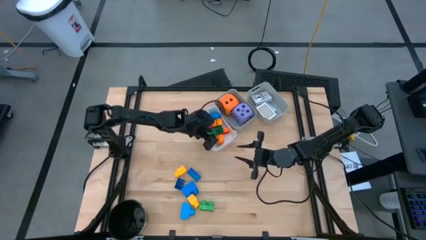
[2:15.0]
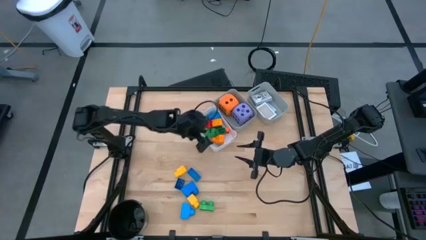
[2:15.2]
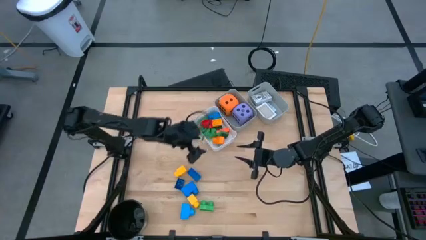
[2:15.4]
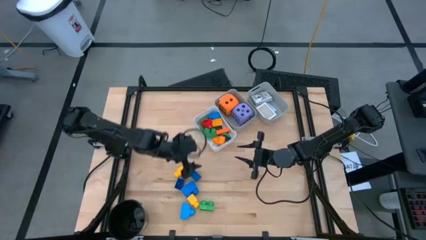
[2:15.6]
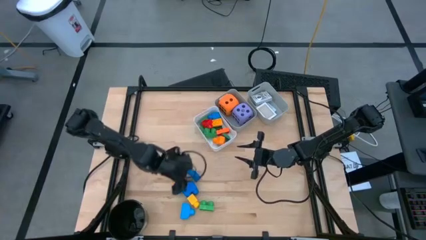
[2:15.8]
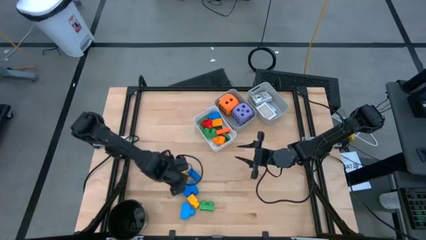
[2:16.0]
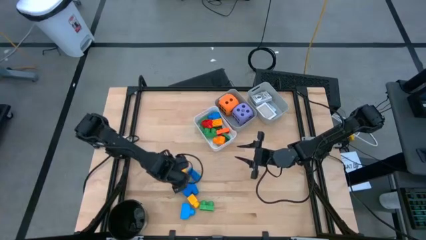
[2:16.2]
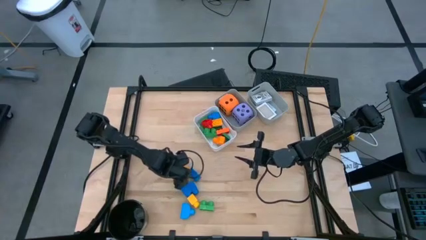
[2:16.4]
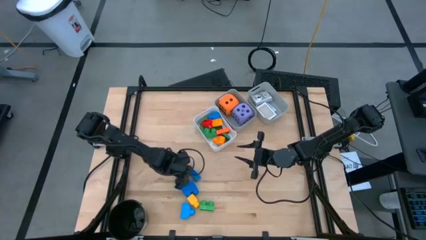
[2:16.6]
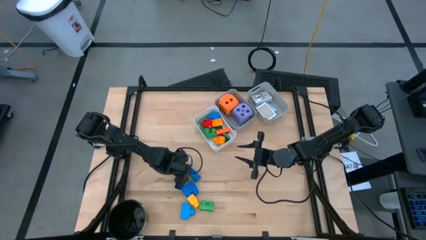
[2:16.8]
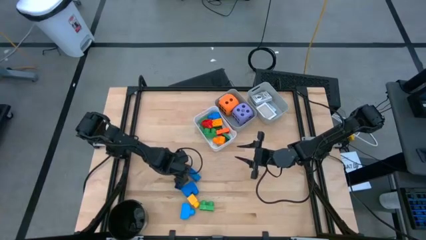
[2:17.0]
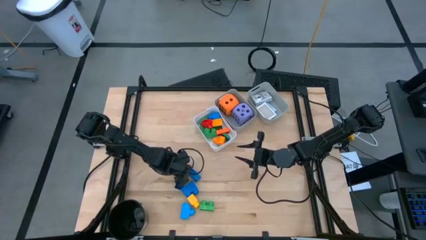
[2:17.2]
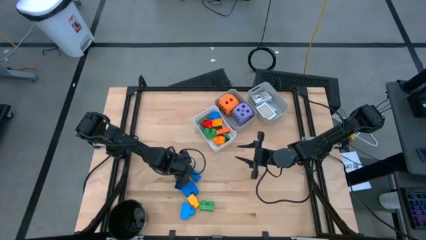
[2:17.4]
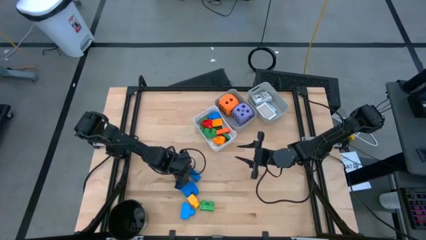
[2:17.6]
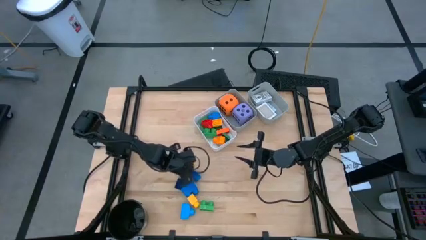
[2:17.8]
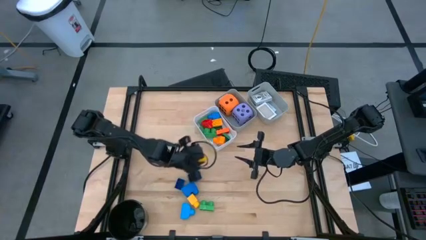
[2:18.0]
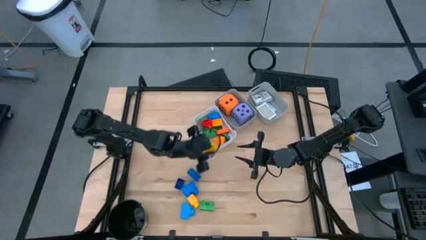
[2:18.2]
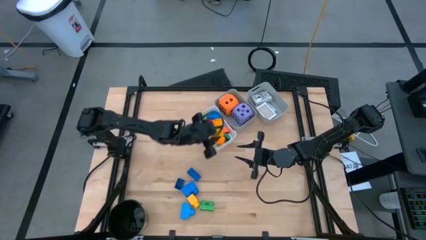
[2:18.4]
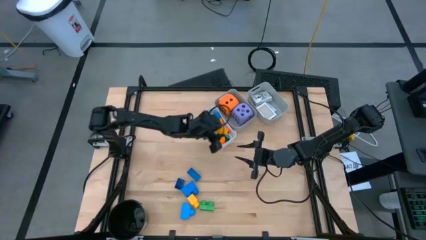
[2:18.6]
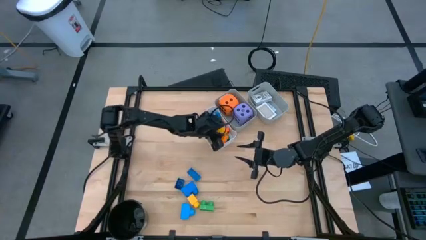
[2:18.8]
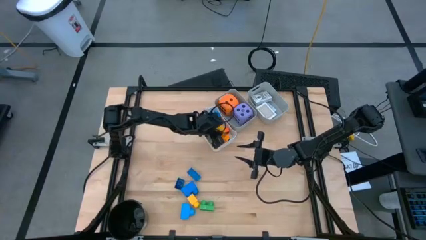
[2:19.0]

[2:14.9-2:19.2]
Task: Pick & Place Toys
Put the yellow game piece into the white bin

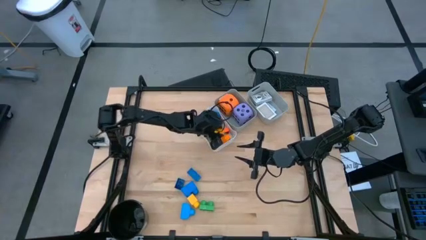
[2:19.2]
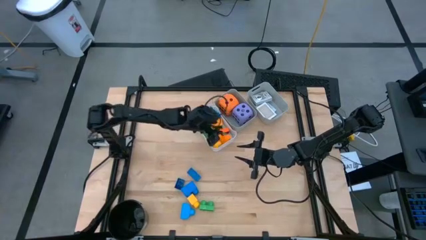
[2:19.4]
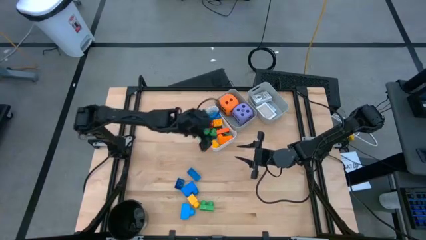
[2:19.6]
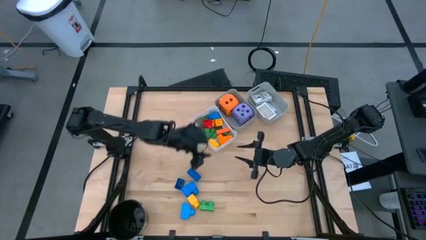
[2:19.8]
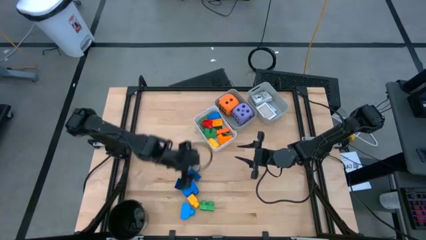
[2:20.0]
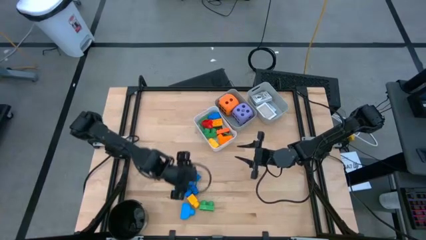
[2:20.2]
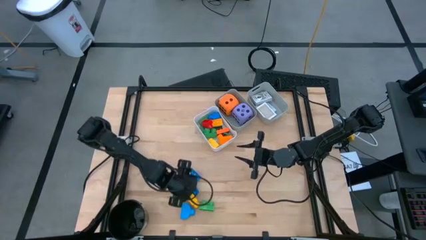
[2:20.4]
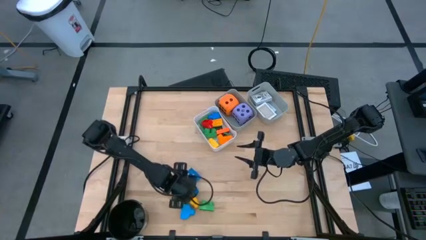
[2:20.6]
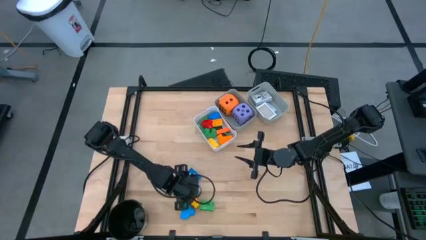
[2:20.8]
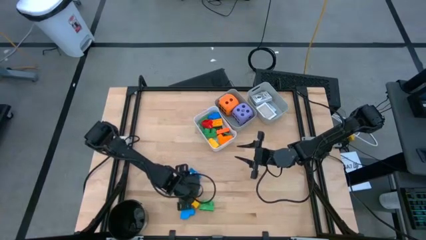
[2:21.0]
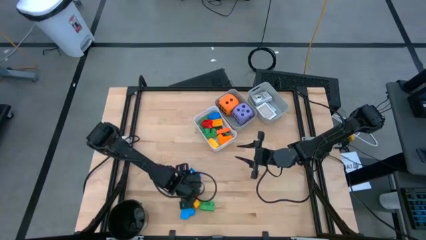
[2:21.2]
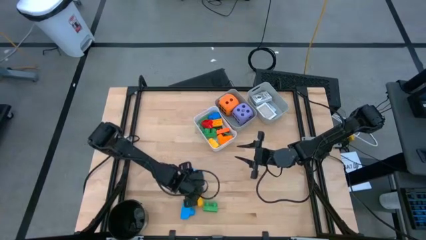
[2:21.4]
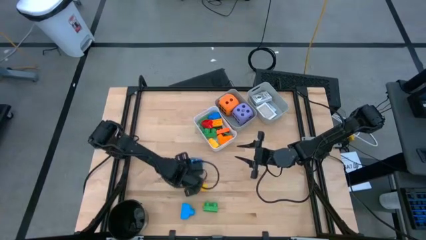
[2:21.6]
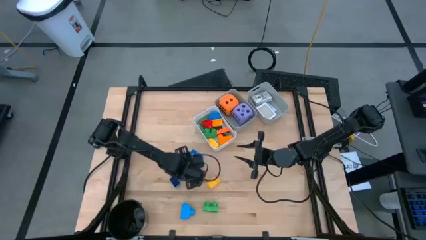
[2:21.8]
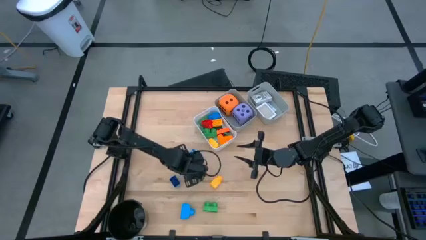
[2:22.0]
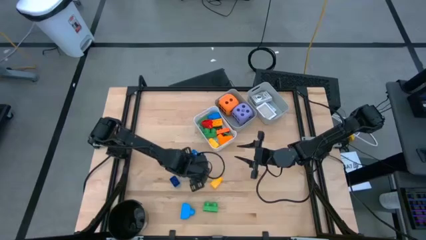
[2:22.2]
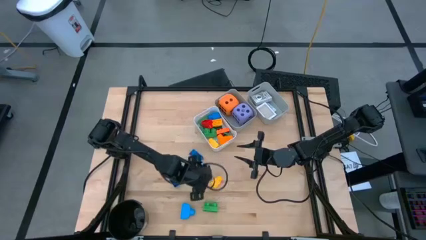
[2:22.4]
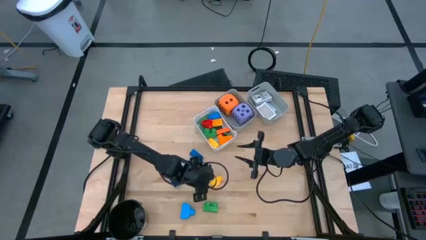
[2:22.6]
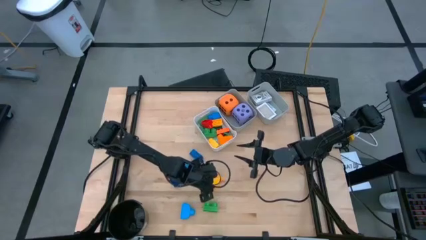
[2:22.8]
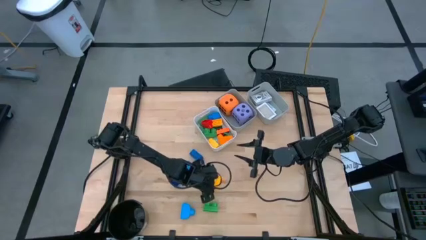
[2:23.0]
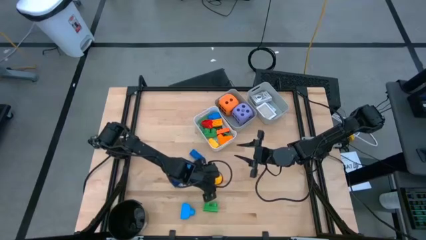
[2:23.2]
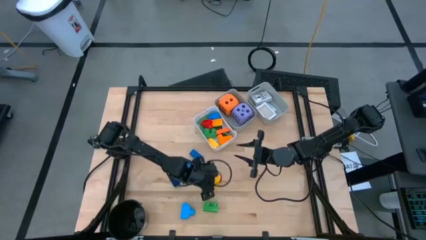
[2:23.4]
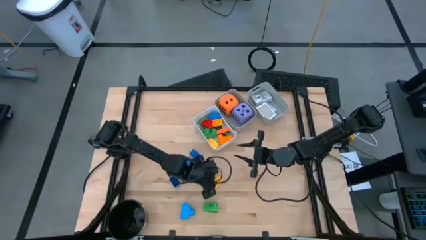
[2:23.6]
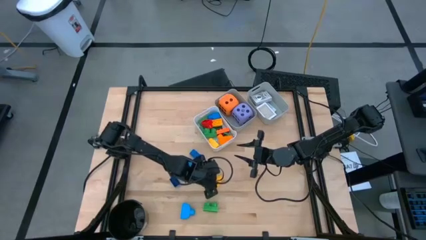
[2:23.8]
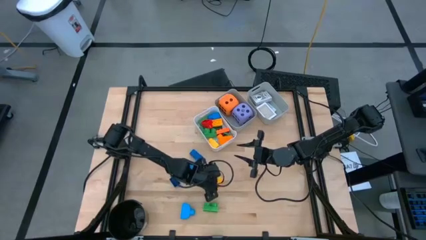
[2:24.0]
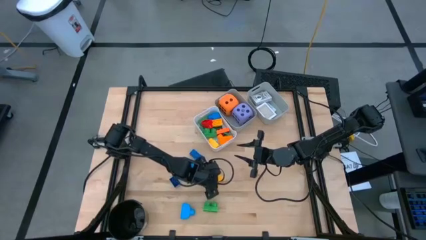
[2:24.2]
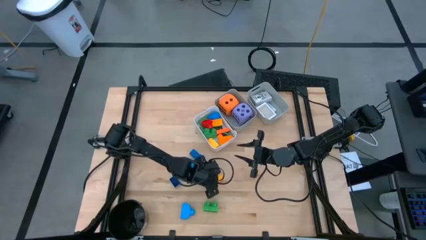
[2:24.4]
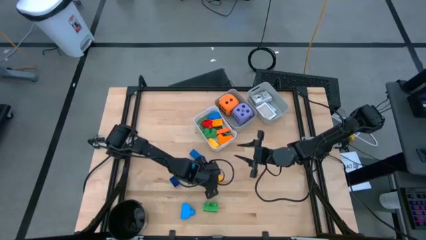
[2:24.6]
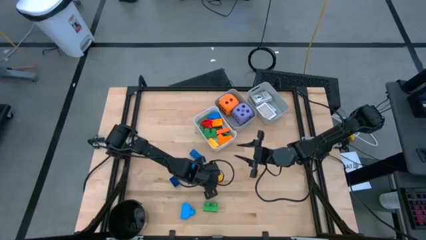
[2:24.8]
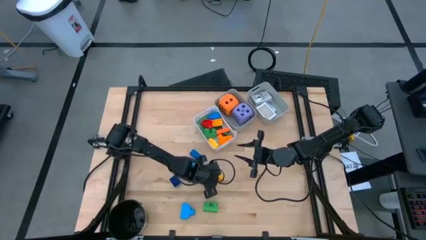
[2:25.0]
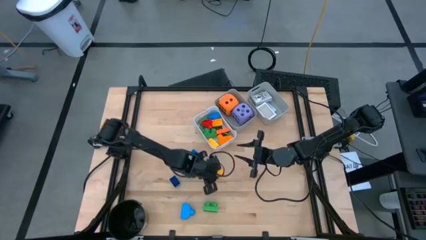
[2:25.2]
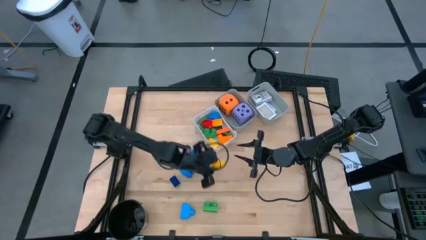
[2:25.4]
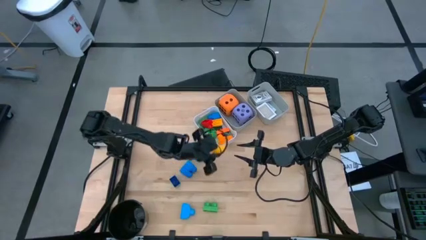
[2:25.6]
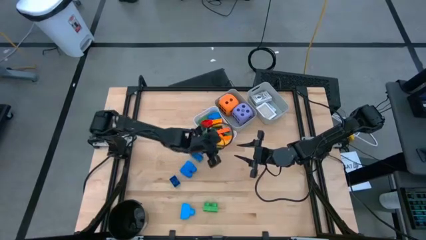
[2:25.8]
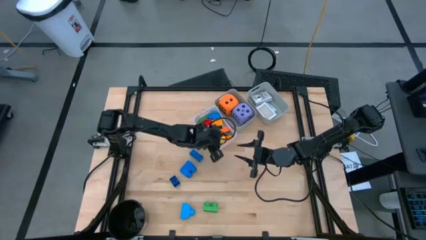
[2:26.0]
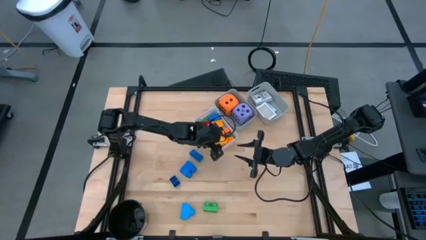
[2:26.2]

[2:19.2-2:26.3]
Put the yellow game piece into the white bin

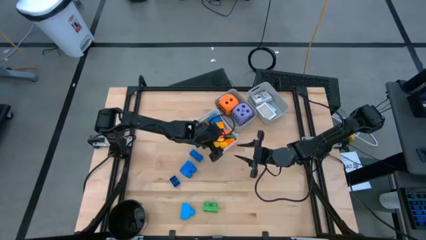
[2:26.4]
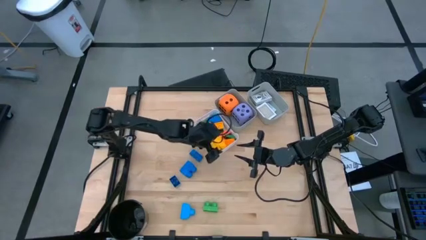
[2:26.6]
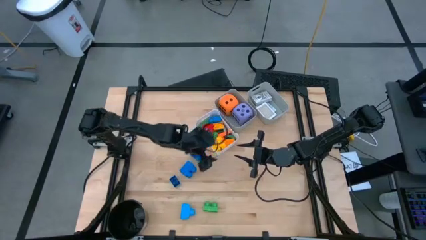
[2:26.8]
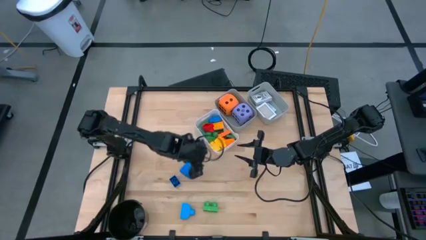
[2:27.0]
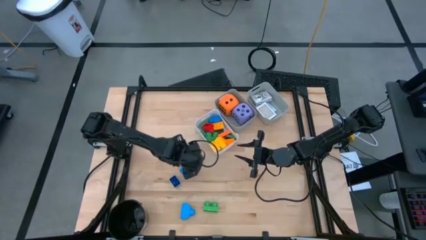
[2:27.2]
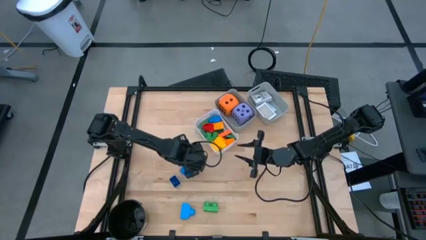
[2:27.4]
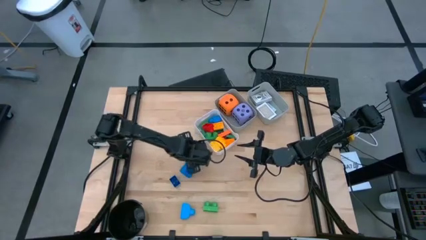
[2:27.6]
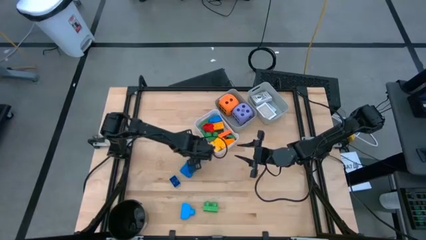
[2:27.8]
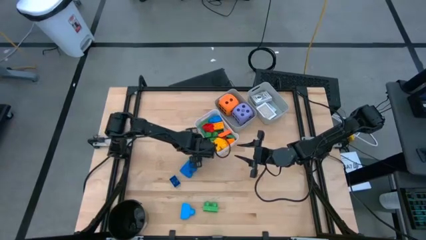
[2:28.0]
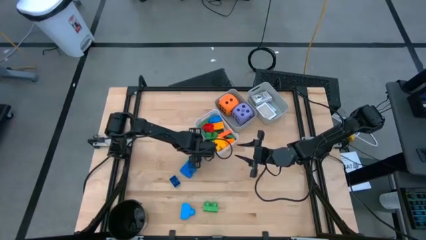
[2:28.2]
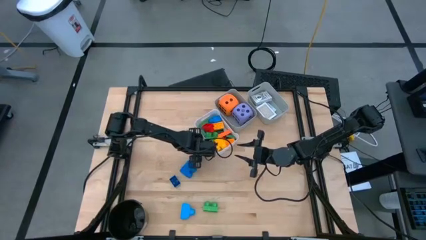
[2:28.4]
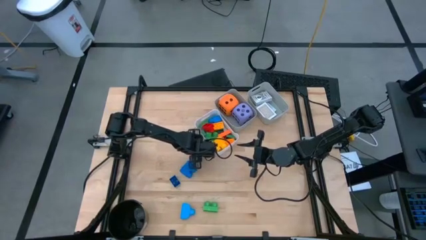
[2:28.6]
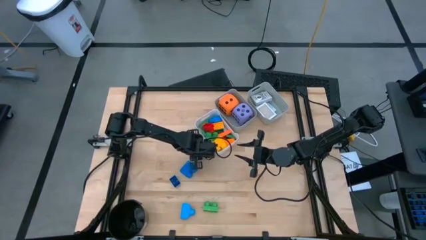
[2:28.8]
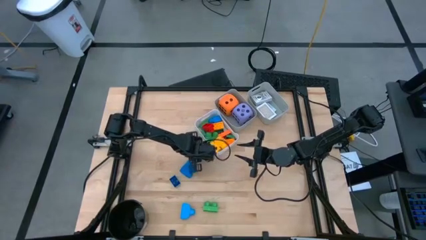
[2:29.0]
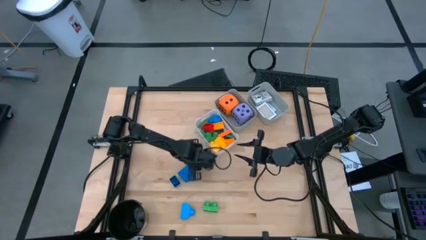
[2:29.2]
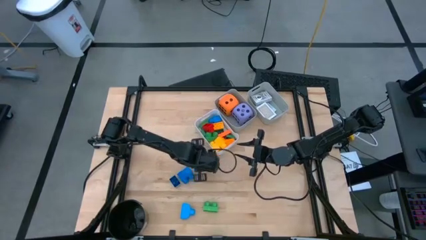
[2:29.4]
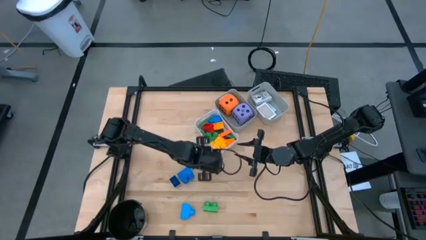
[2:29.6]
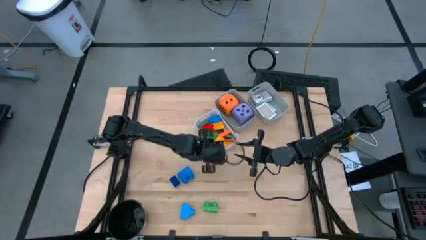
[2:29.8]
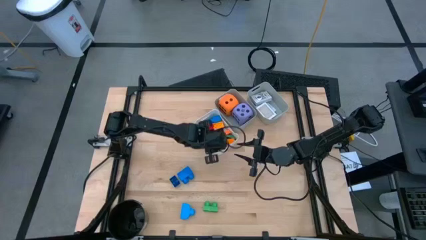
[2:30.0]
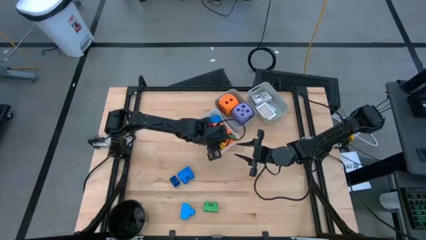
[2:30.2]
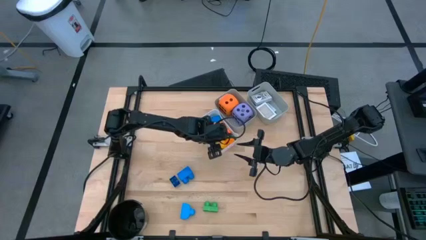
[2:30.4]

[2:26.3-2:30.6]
Put the blue game piece into the white bin

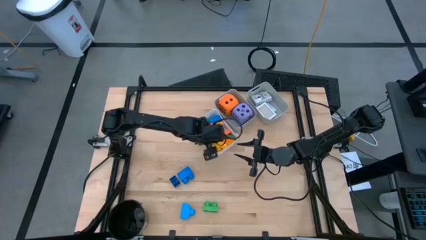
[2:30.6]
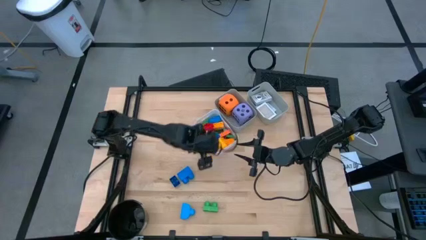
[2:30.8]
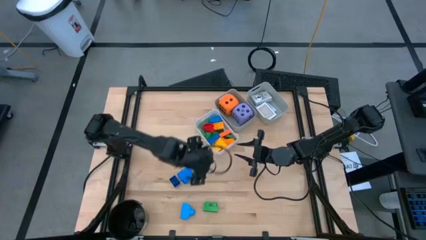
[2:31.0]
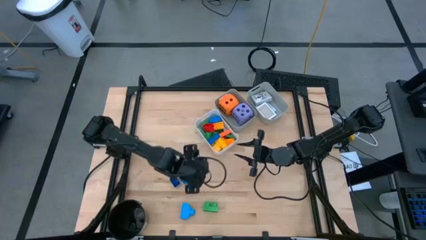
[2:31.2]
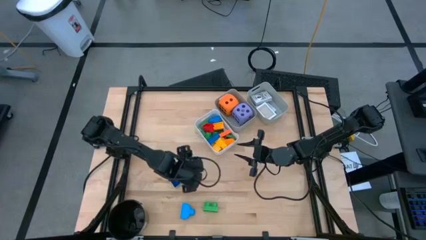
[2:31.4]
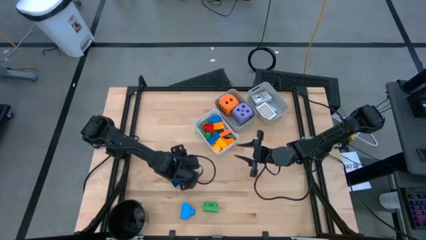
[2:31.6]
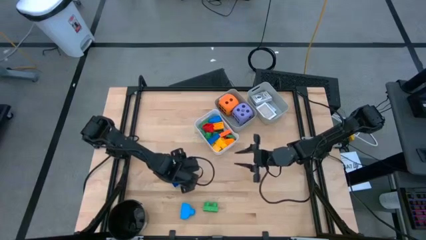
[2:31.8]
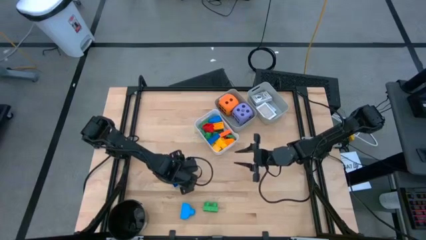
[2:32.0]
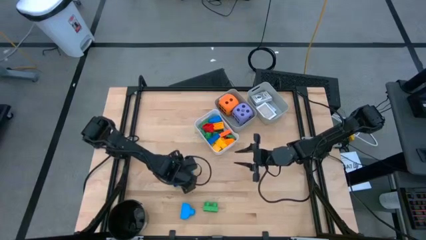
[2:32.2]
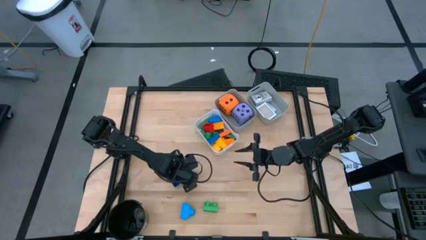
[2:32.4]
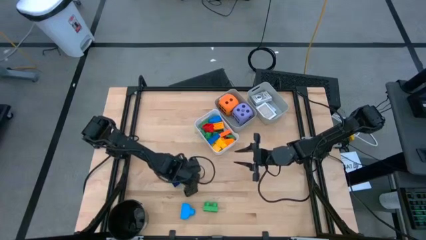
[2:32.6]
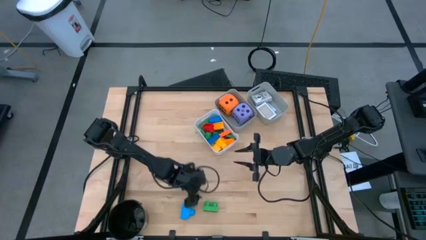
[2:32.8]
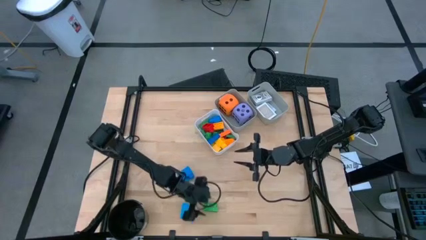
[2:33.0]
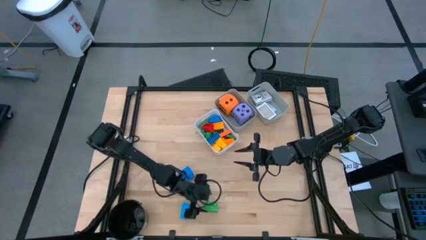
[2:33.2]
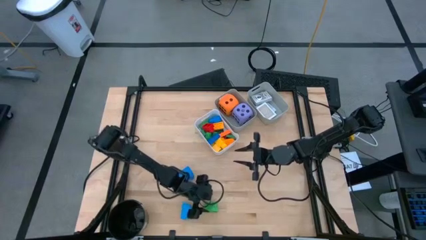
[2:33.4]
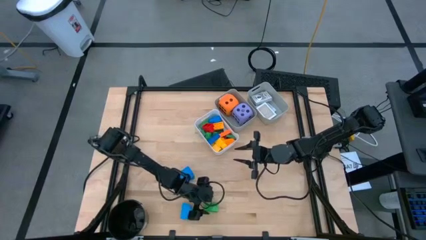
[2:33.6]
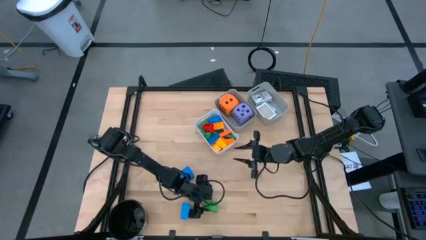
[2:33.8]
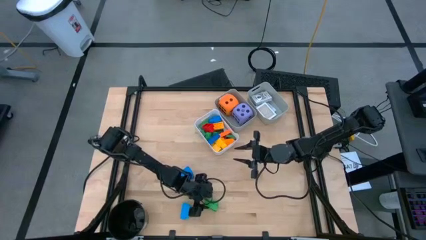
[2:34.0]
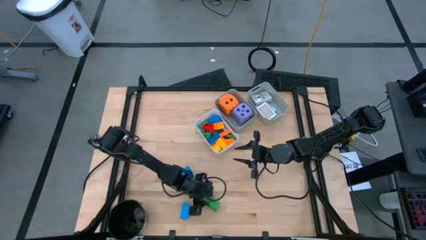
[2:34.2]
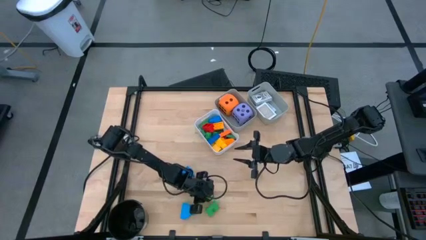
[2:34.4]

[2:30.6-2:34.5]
Put the green game piece into the white bin
